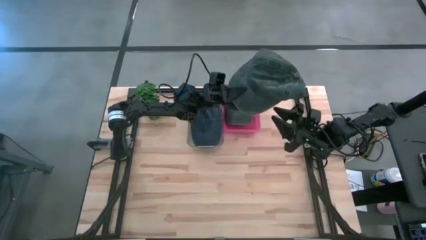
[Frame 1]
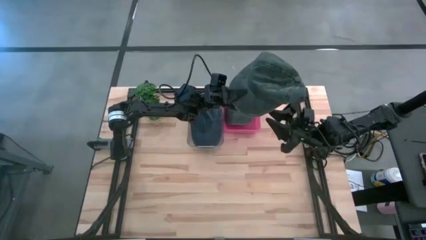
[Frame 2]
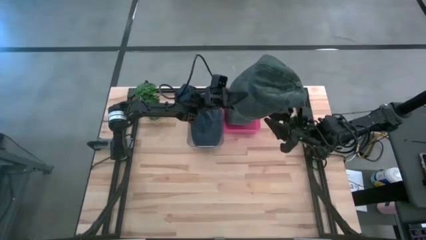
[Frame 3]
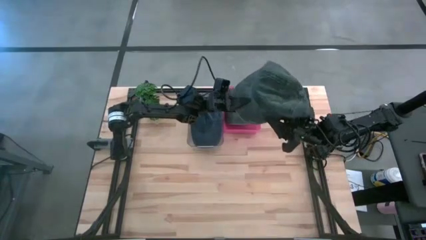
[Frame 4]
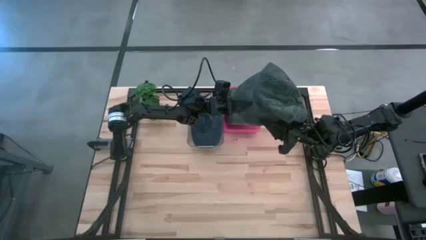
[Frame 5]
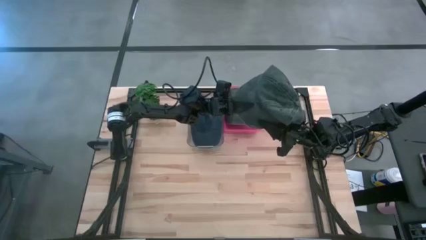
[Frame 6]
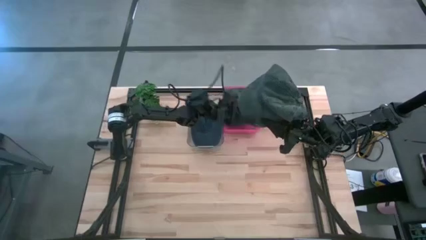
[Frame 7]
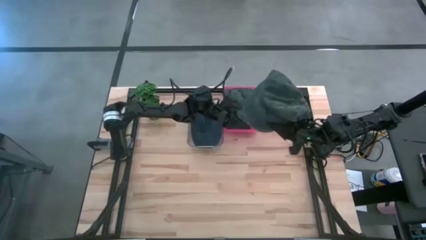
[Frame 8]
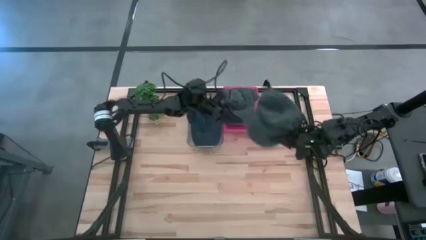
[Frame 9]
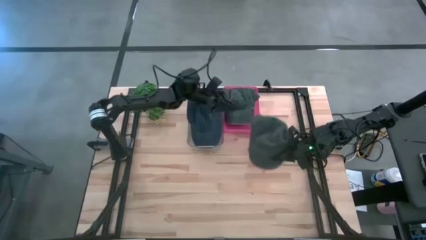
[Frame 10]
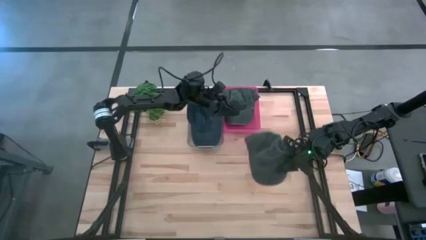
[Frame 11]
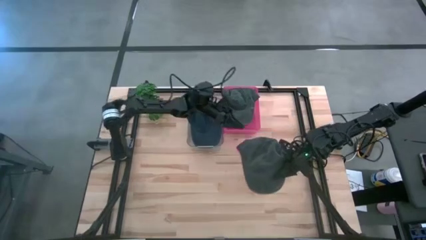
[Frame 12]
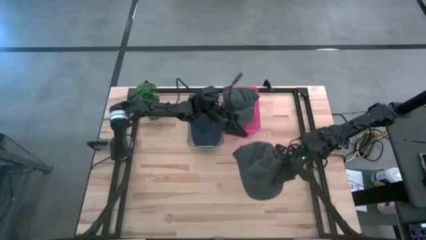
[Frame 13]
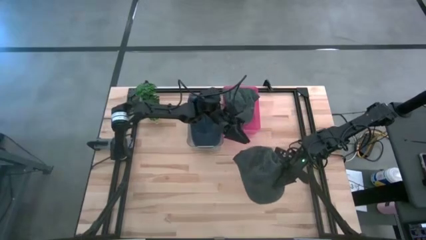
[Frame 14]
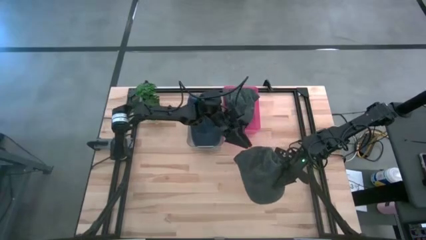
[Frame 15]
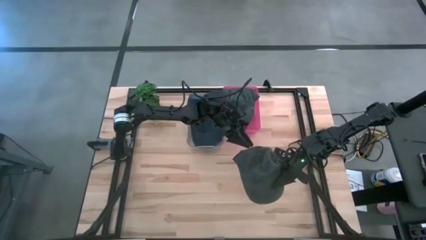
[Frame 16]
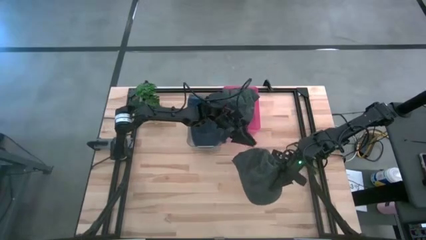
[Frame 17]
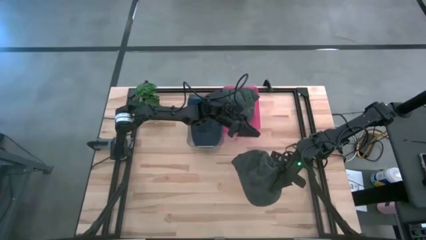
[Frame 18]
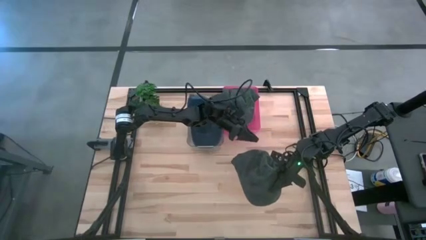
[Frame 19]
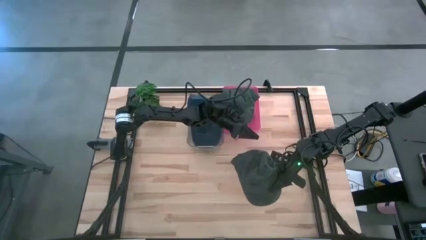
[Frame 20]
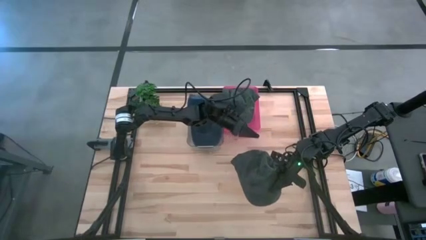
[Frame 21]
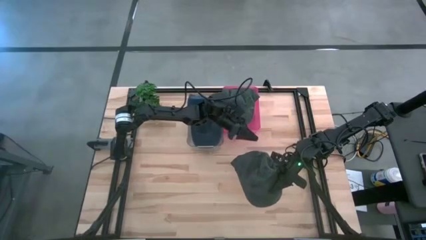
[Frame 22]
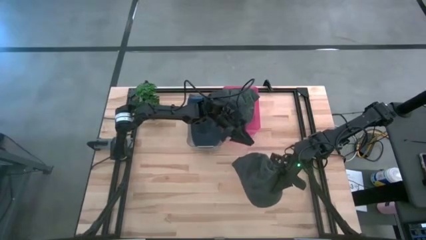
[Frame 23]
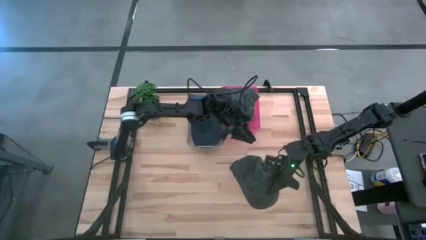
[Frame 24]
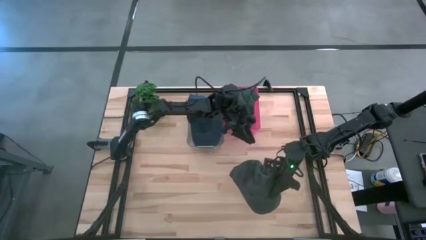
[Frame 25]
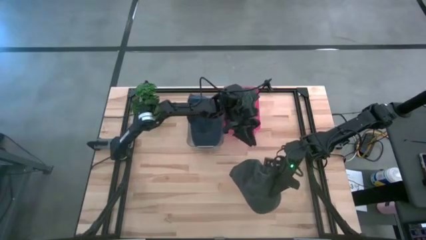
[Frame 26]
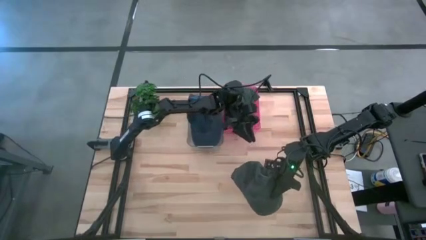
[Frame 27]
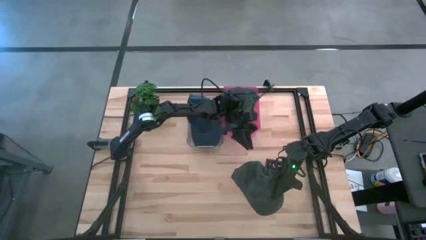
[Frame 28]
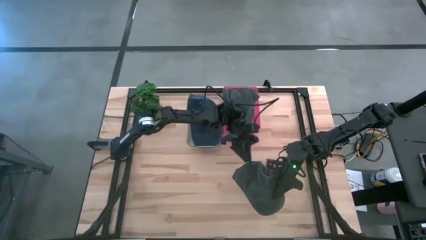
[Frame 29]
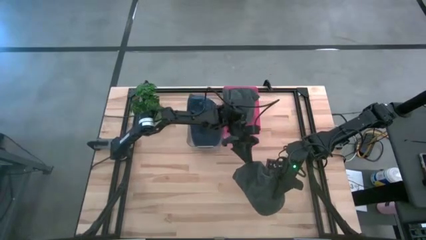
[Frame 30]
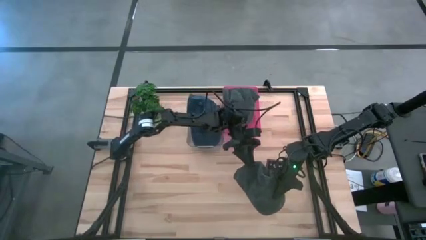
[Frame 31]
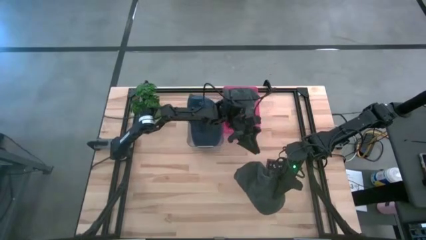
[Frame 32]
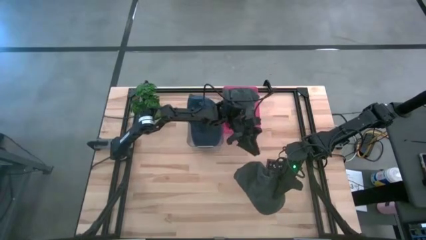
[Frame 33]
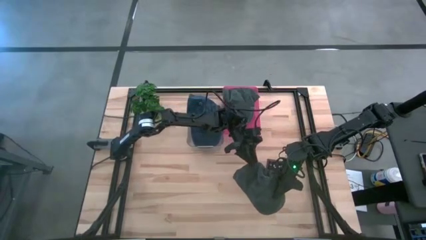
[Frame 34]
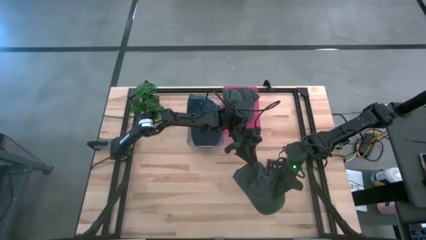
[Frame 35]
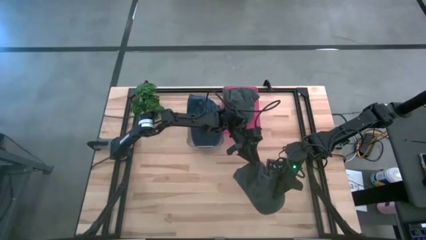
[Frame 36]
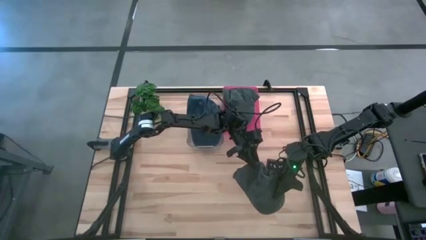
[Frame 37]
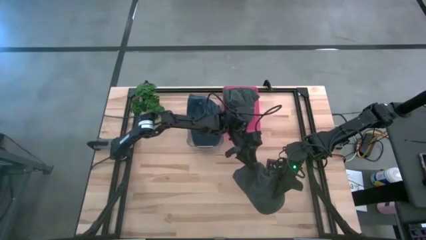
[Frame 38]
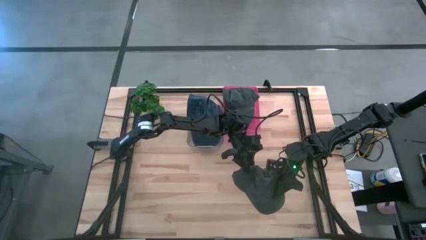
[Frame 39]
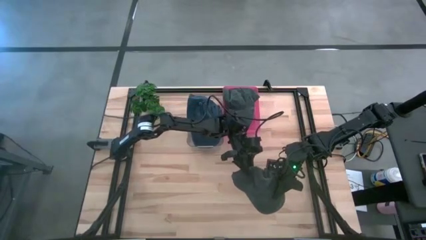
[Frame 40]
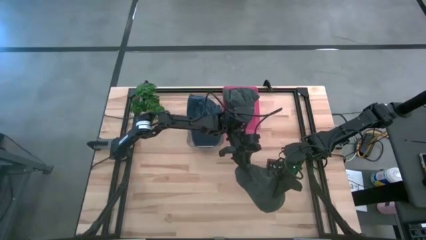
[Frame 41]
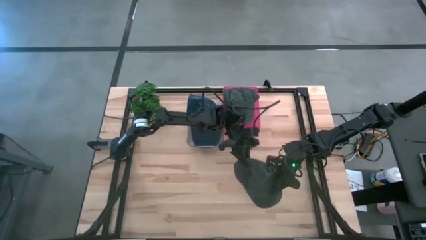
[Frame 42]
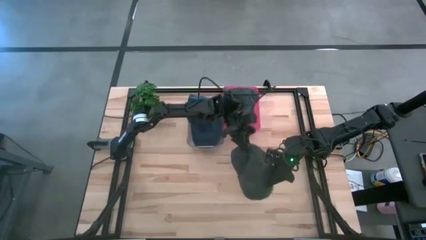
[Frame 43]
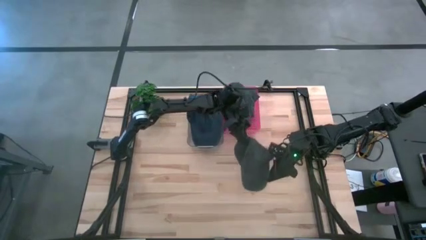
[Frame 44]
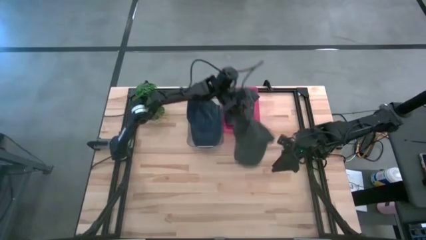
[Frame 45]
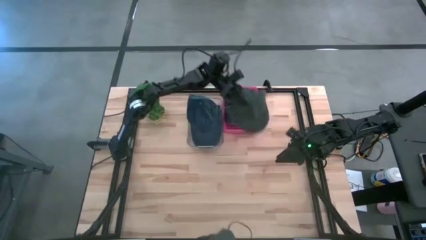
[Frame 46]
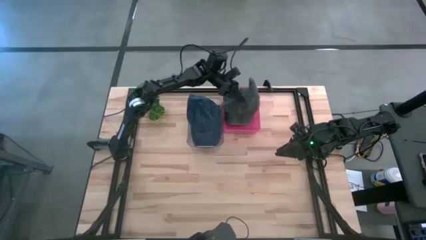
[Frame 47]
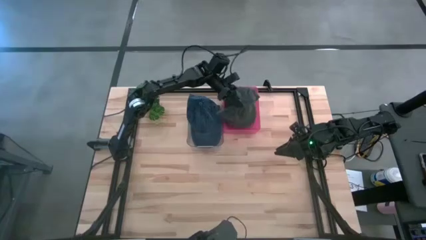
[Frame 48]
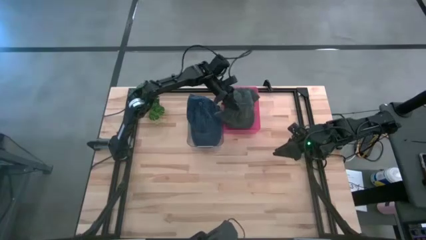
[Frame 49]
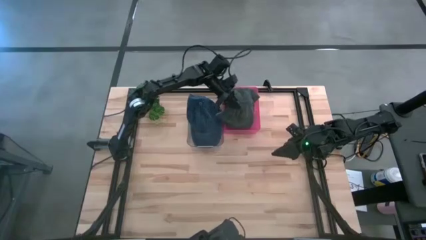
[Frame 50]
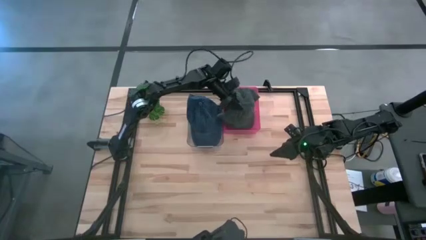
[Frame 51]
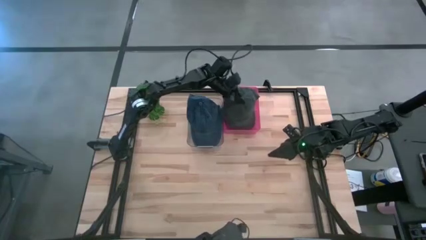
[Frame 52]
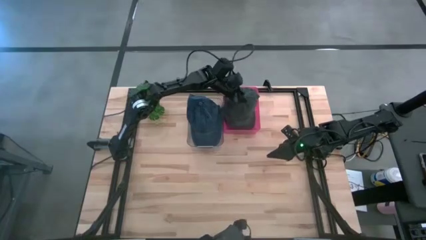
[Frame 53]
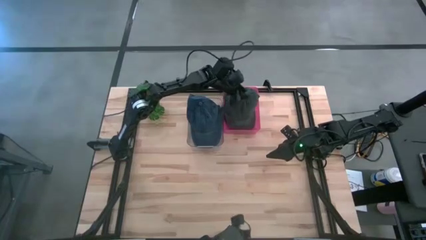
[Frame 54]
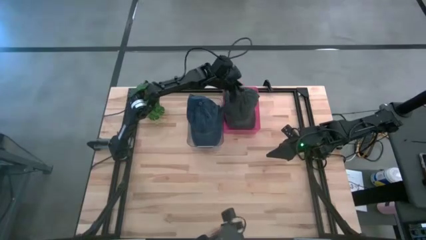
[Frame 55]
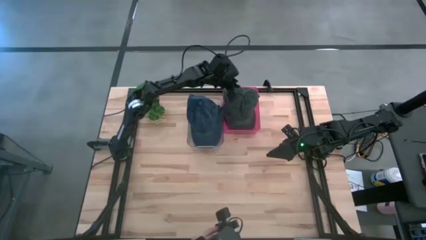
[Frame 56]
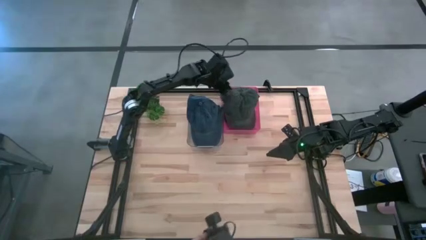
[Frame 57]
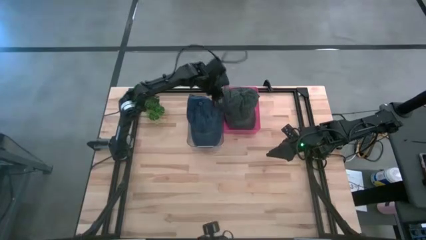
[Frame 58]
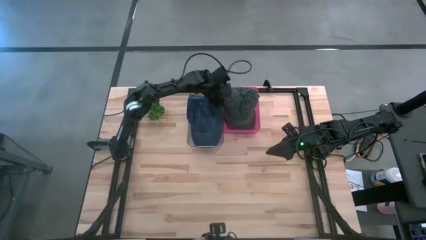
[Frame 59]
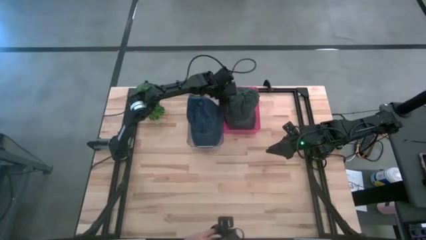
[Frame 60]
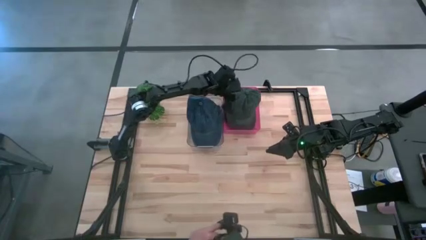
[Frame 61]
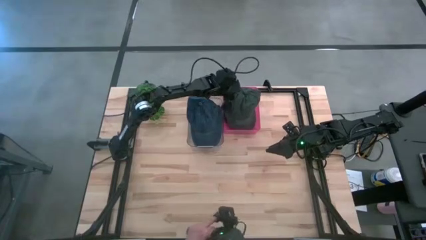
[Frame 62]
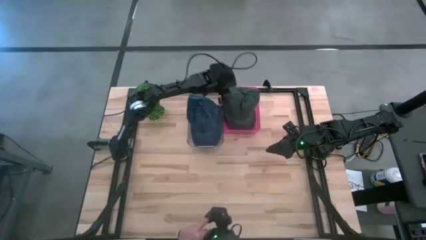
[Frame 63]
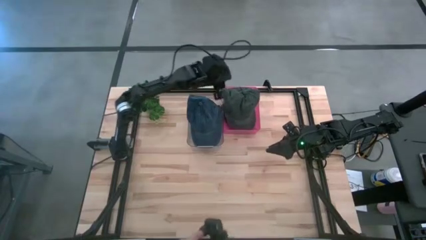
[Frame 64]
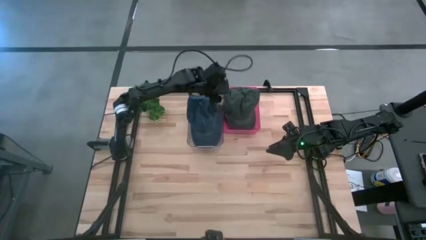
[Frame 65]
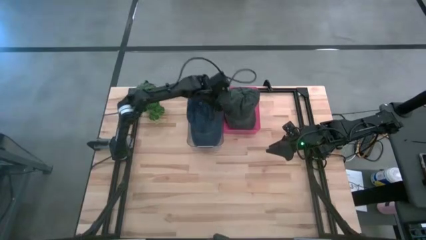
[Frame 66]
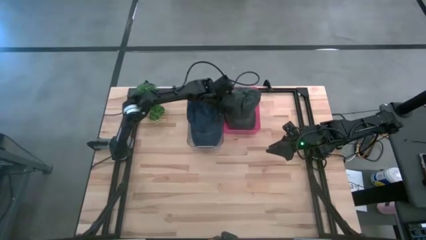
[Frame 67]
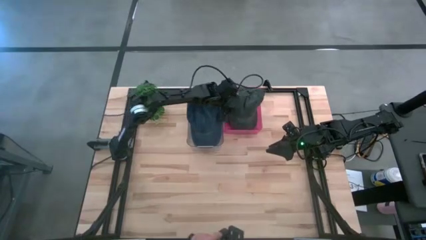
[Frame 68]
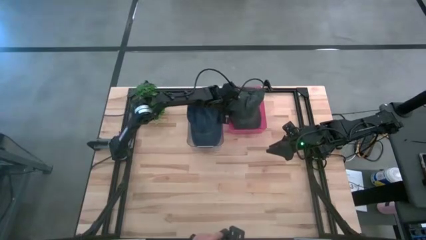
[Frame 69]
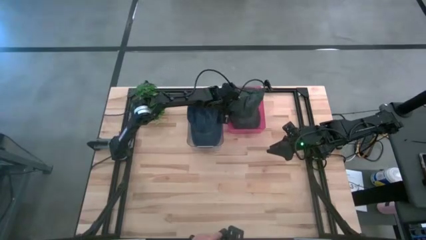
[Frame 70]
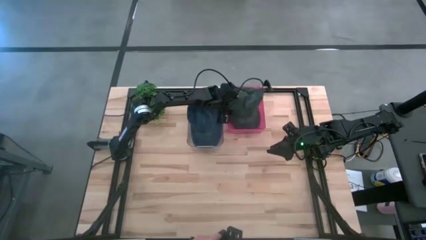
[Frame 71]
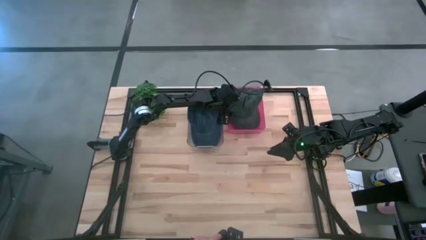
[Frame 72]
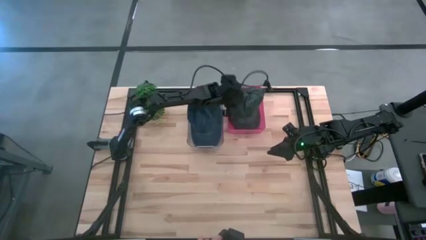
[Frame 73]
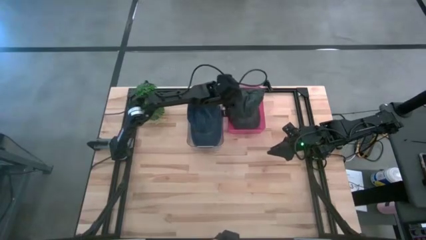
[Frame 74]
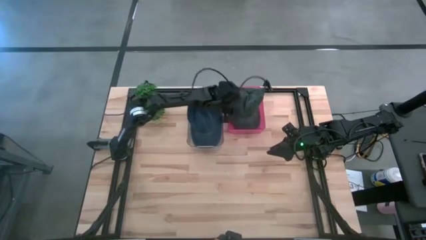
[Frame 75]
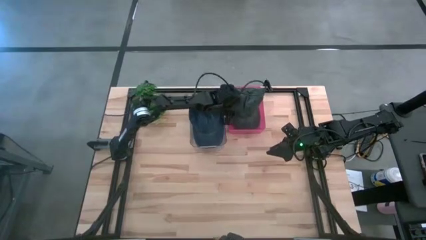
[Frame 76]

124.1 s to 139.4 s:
Task: Pick & Place hat
Put the green cap into the red bin
